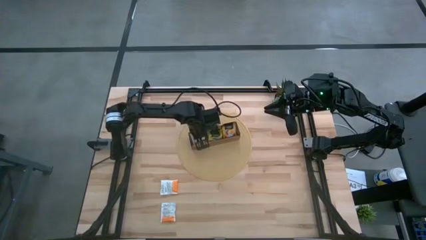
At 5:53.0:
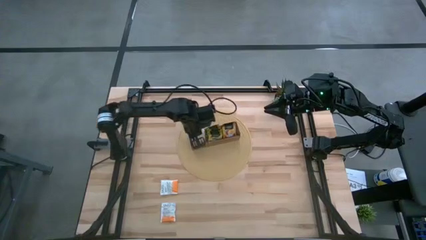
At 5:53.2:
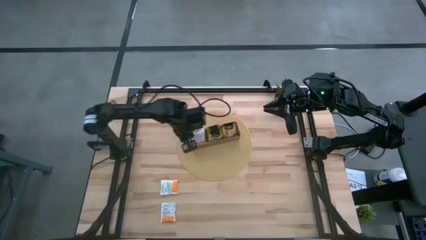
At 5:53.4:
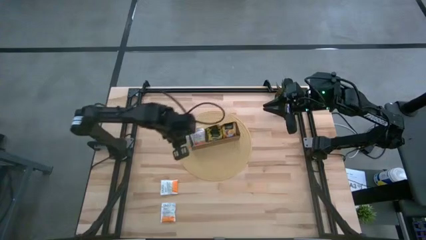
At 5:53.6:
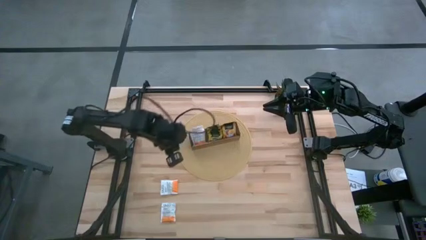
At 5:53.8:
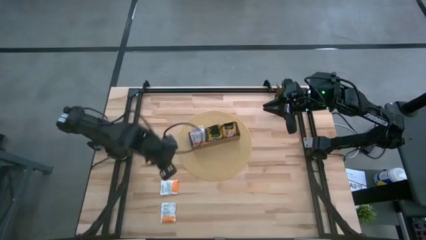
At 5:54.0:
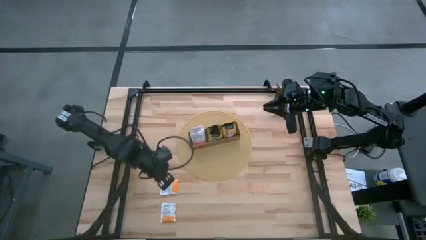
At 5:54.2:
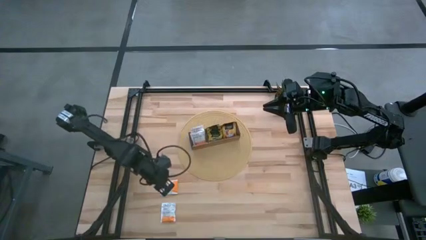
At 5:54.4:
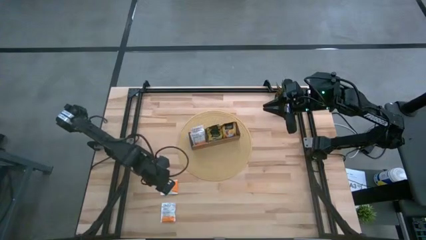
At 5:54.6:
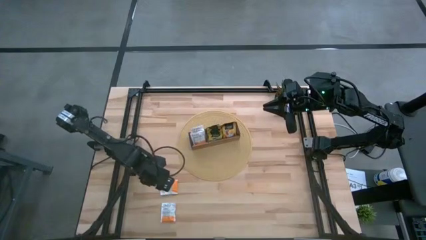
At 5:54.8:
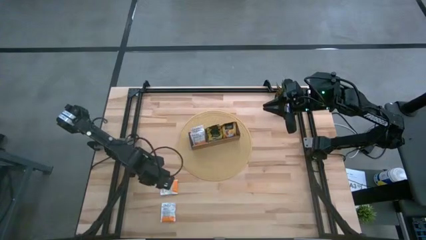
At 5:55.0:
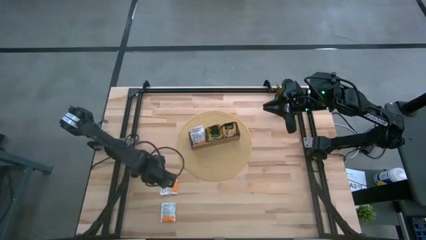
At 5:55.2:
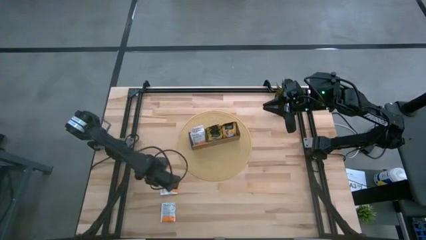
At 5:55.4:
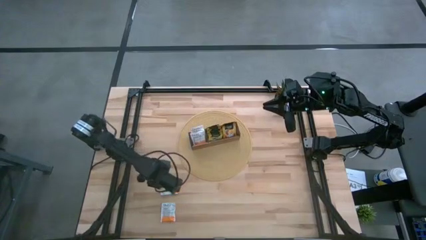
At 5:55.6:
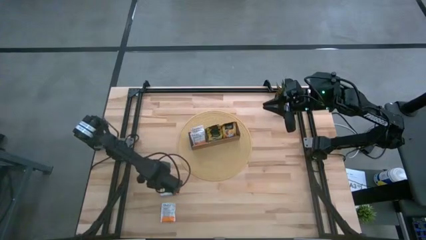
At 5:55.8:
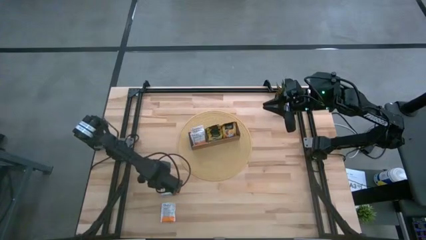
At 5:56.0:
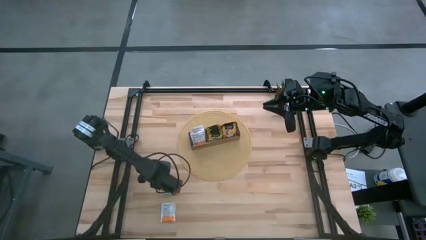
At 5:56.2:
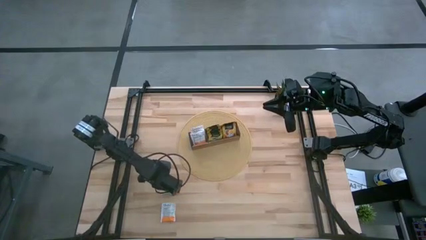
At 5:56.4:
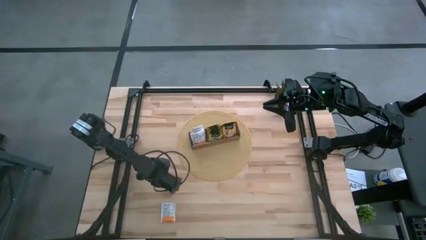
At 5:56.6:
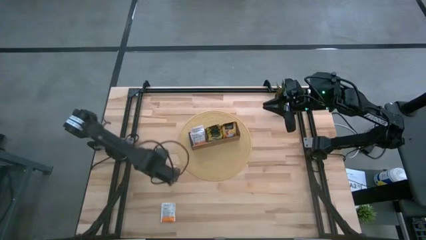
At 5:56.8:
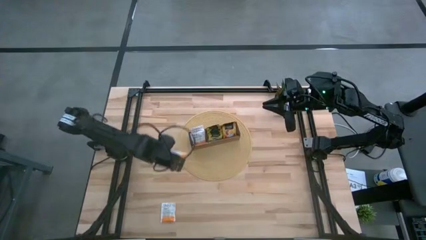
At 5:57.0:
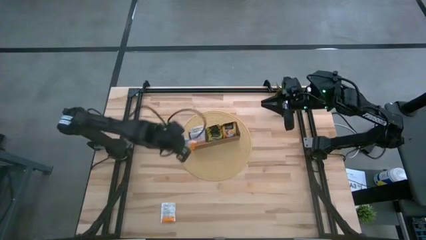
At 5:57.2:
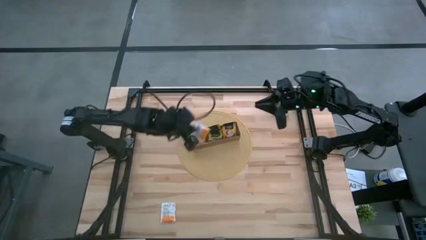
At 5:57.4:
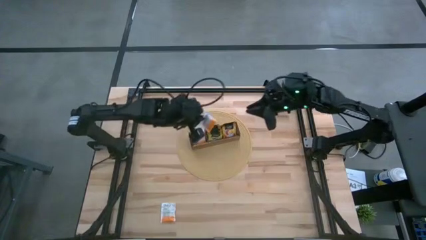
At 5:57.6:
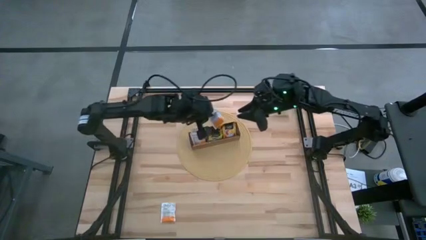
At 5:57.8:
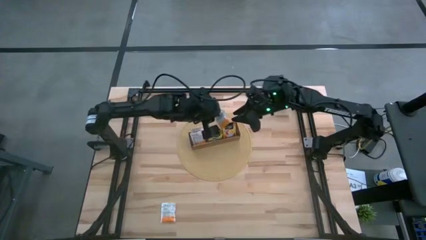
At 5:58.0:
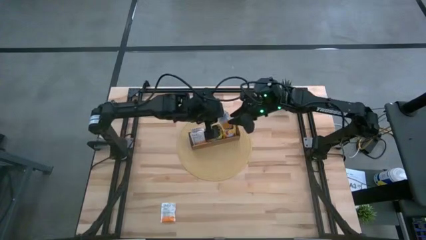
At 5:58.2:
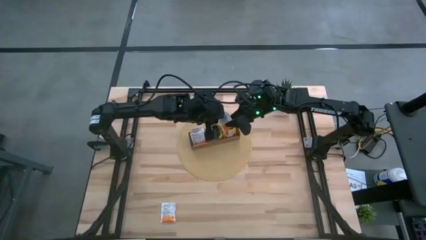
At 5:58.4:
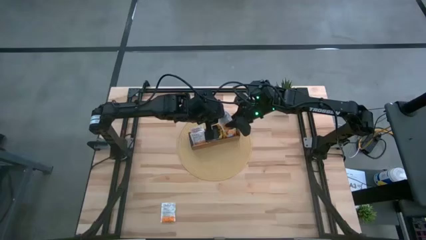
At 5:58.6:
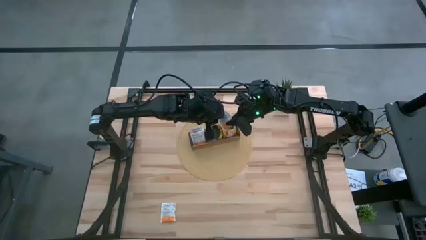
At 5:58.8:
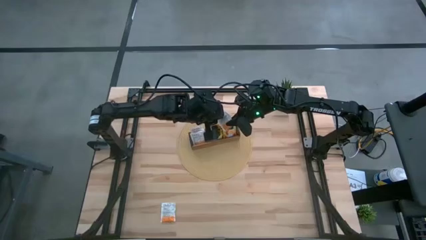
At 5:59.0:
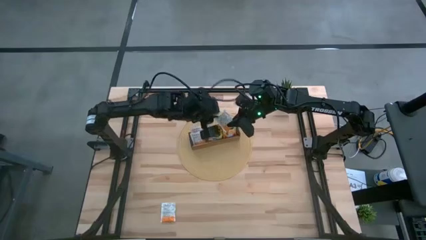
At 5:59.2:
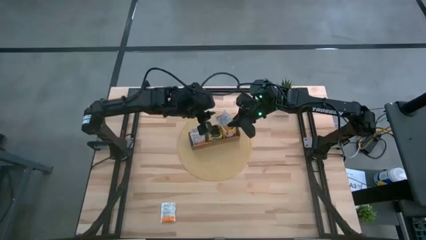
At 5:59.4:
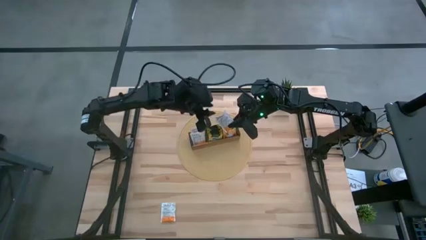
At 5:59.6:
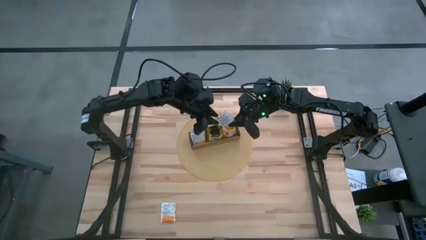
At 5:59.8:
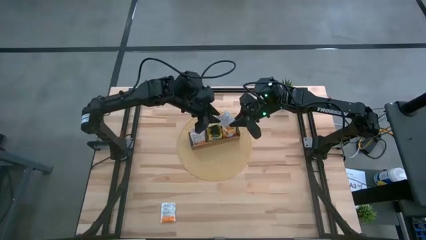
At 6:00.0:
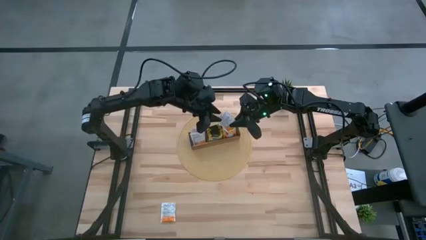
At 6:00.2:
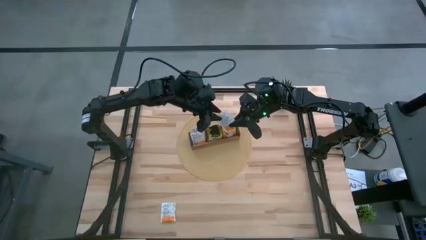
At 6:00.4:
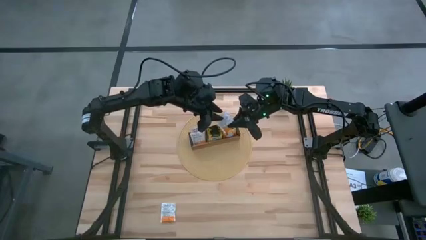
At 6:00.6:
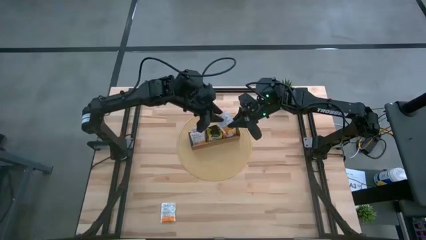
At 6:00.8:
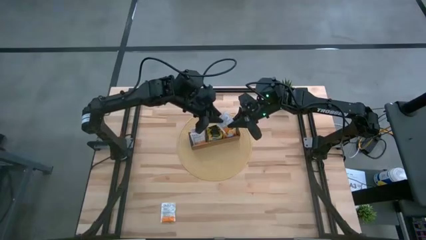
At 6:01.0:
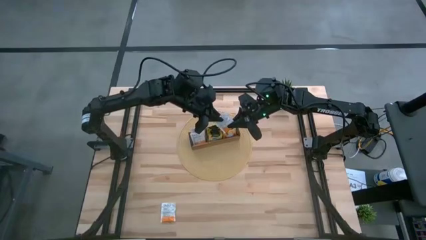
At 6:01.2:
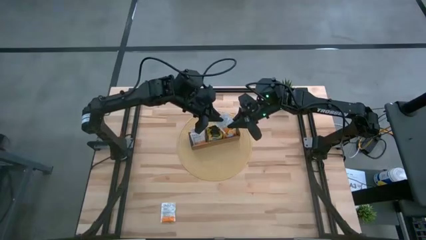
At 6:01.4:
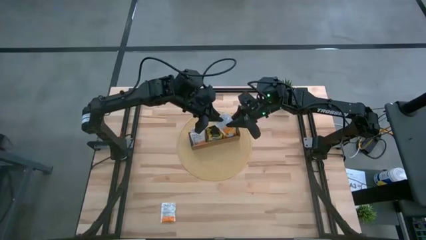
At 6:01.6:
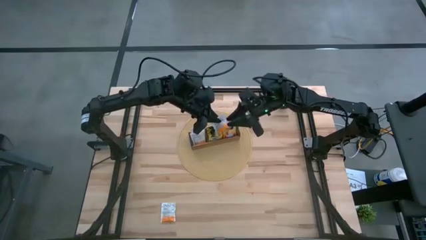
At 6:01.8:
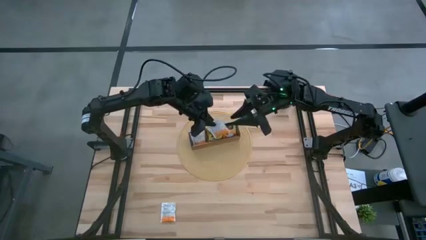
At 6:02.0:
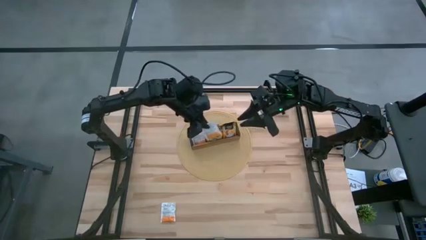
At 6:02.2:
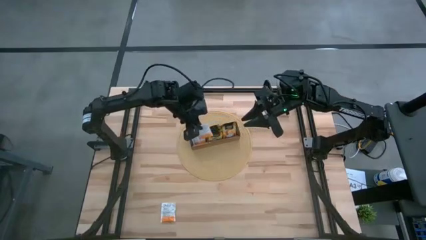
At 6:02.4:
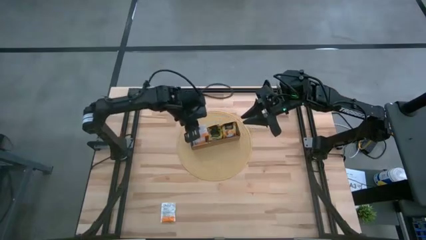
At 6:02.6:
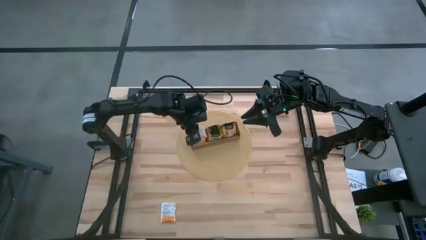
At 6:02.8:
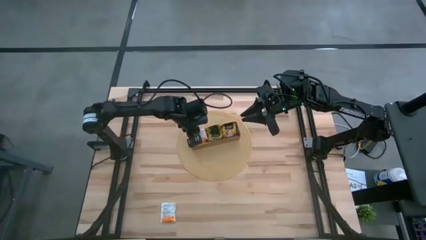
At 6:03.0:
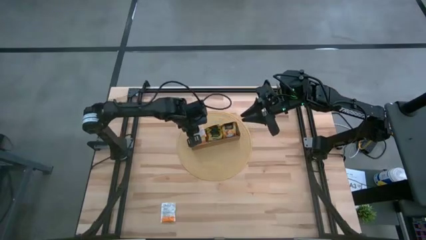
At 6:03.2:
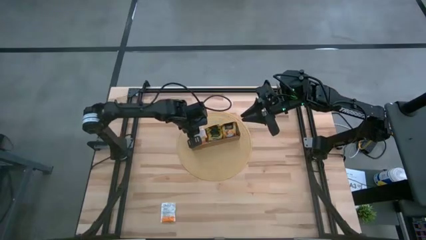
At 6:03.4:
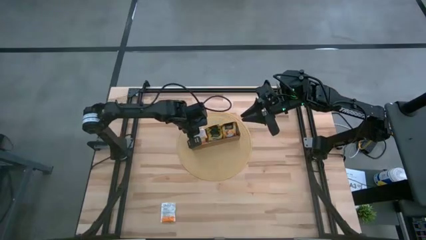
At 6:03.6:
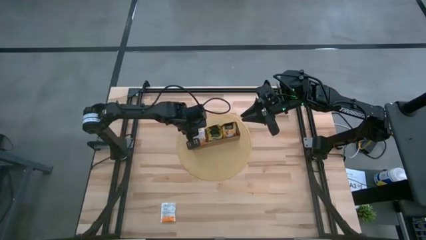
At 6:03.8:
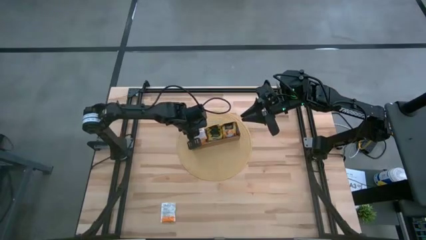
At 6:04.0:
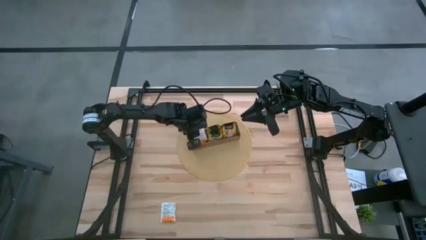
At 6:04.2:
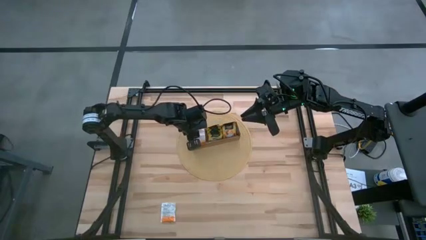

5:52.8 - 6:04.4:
Task: Pick & Place Tea
Put the white tea bag into the left section of the wooden organizer

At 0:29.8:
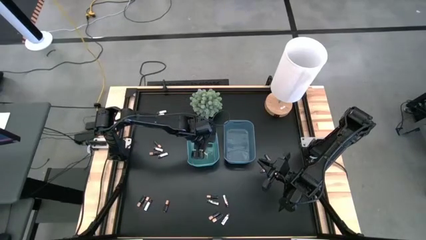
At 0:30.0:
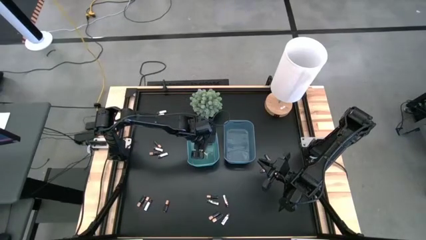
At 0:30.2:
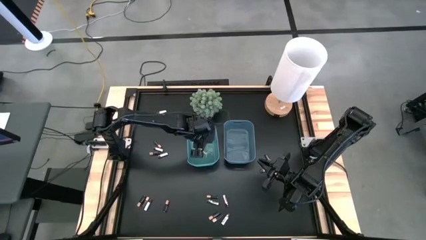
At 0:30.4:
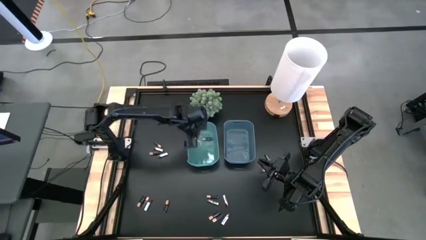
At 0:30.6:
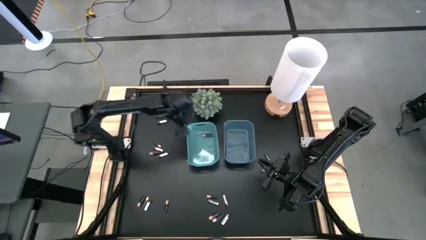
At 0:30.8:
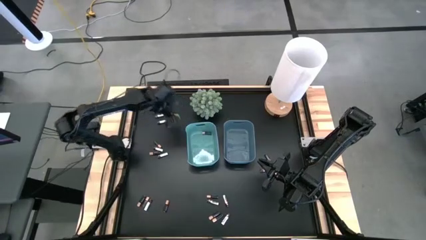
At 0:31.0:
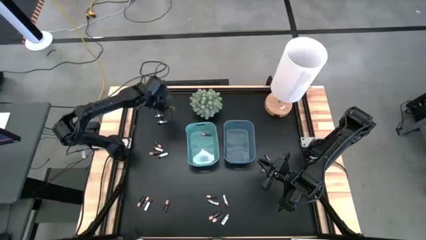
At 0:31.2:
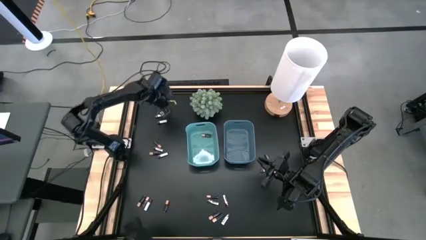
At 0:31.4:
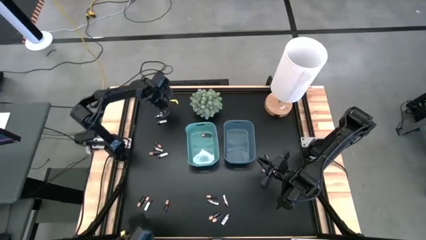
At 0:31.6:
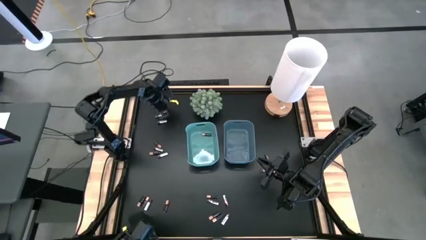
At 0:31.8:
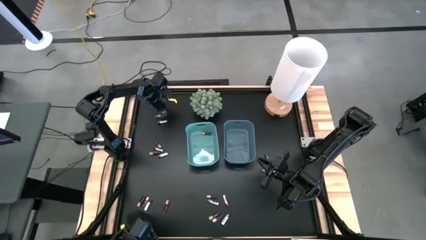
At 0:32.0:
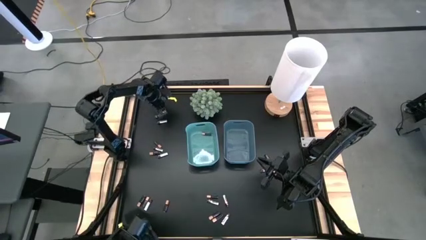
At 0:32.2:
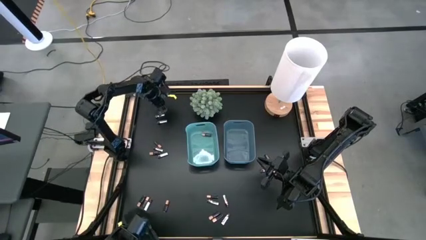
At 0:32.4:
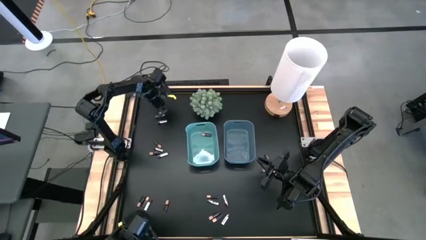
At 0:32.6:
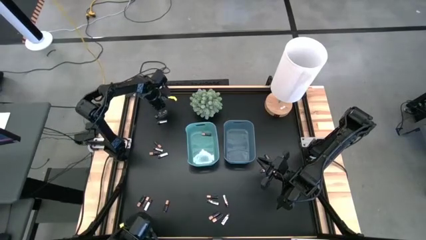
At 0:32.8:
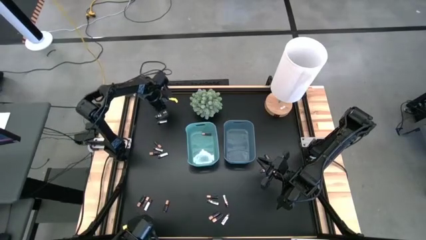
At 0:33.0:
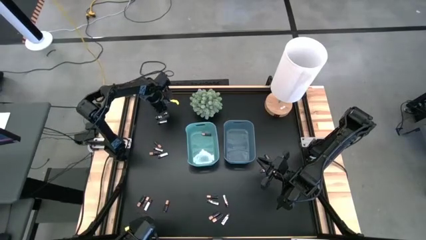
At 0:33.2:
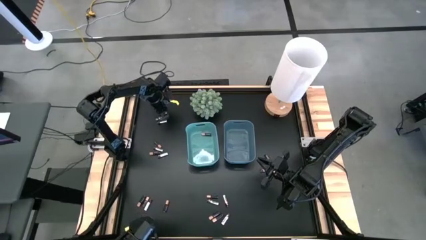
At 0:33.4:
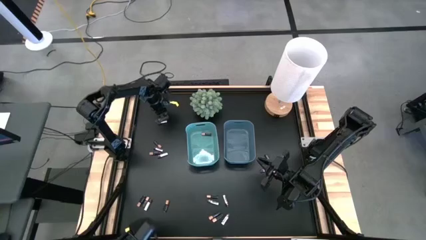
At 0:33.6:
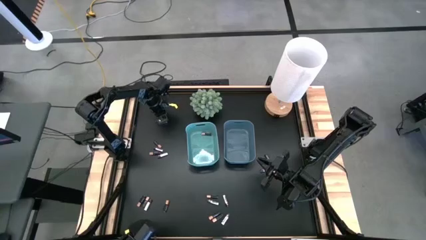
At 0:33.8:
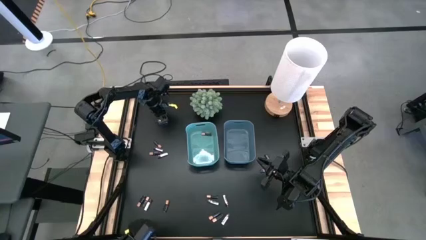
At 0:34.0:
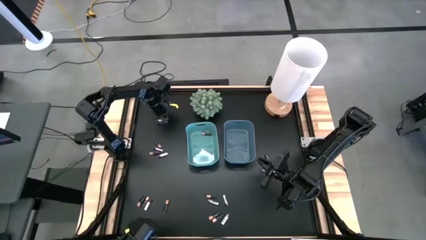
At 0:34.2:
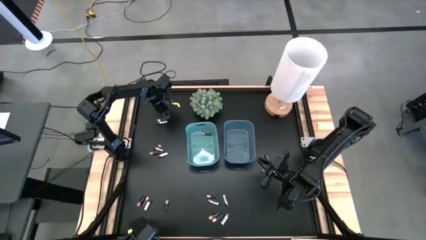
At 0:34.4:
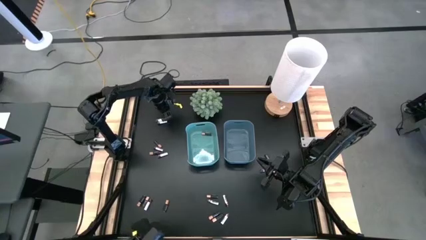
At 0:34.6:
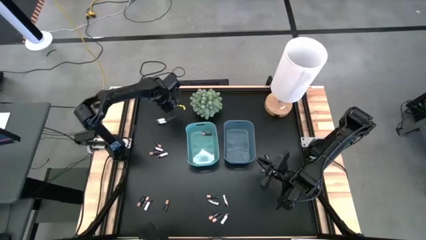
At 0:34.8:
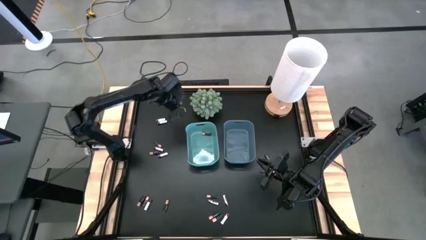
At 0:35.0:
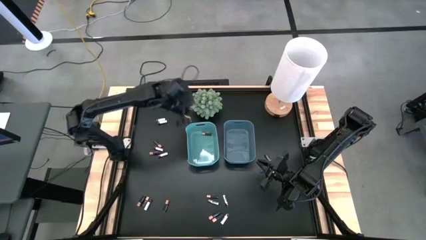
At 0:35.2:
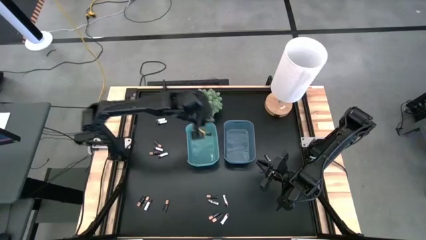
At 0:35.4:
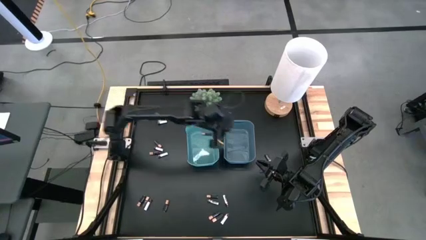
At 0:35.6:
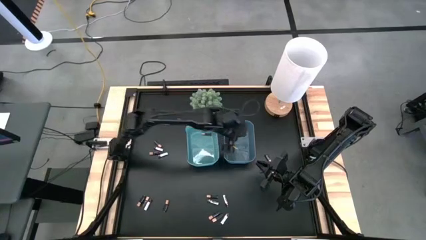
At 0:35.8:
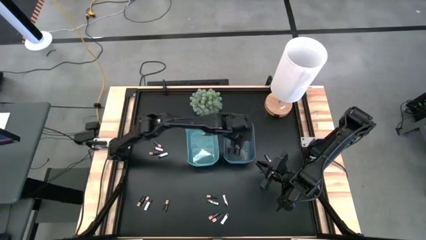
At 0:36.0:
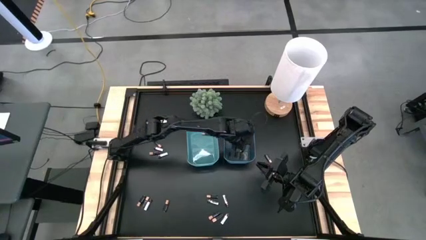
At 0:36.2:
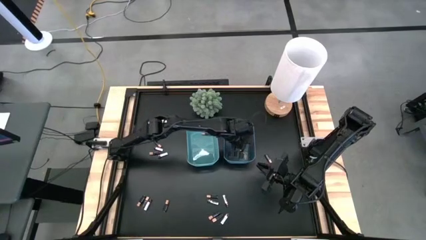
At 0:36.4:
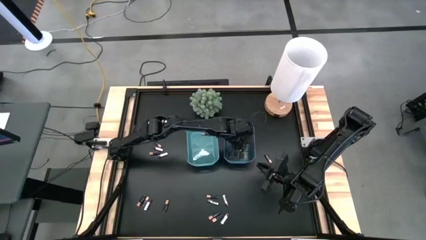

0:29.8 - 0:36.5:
Task: Sort batteries
Put the white battery into the blue bin
